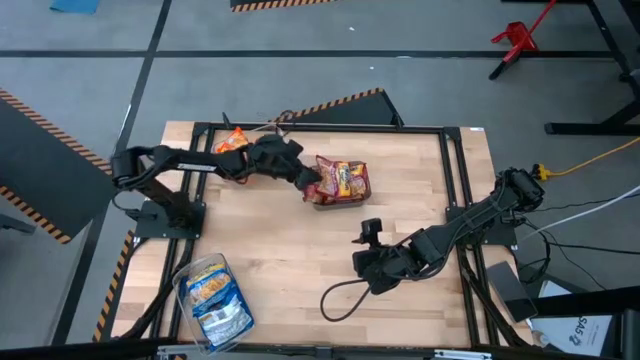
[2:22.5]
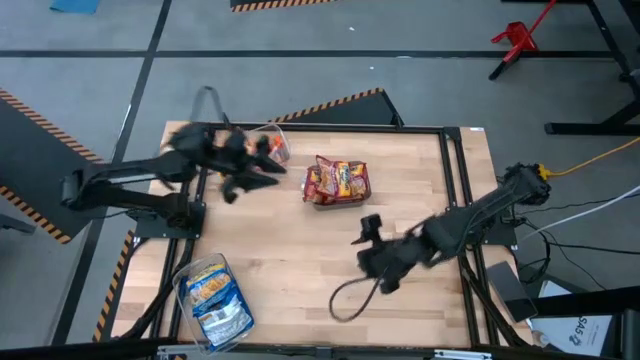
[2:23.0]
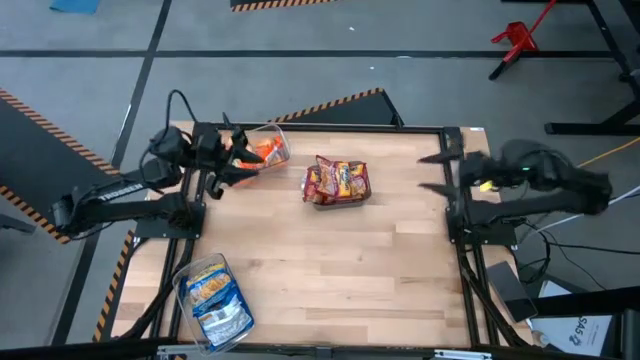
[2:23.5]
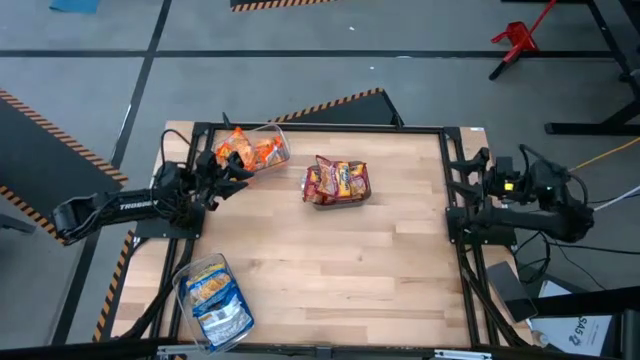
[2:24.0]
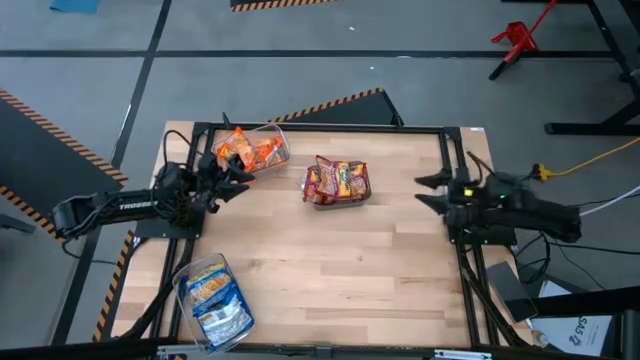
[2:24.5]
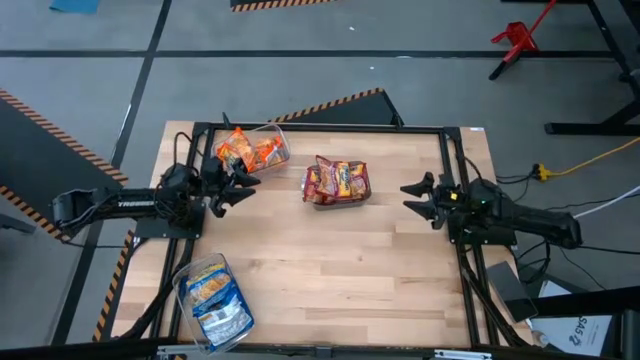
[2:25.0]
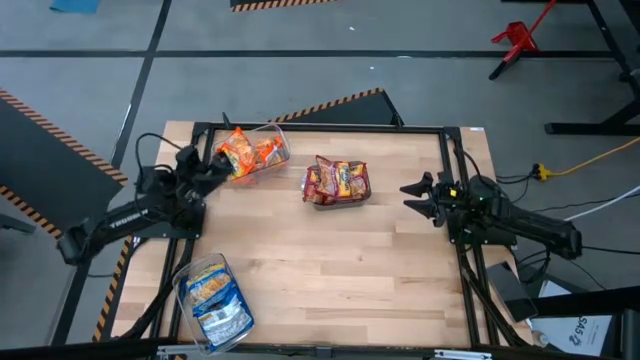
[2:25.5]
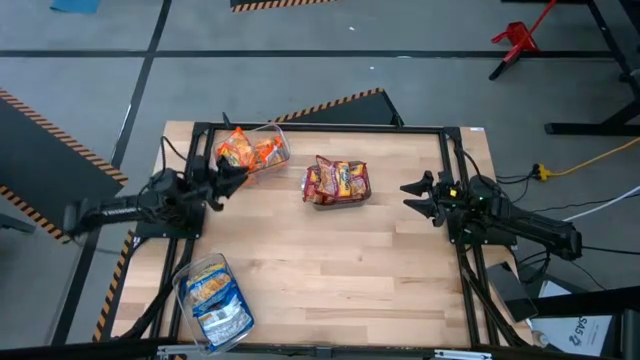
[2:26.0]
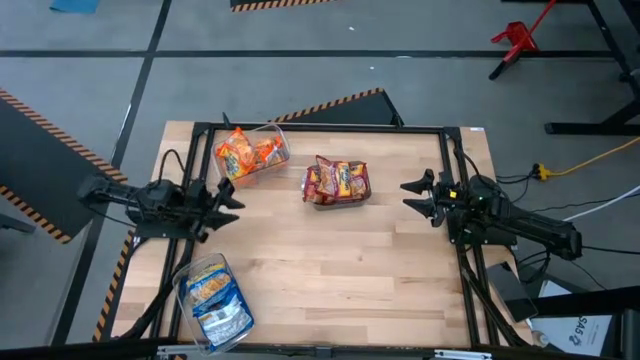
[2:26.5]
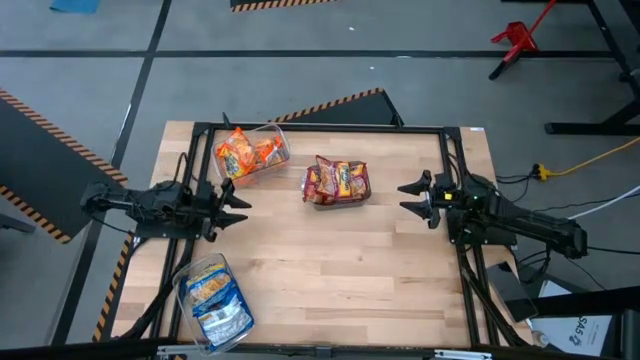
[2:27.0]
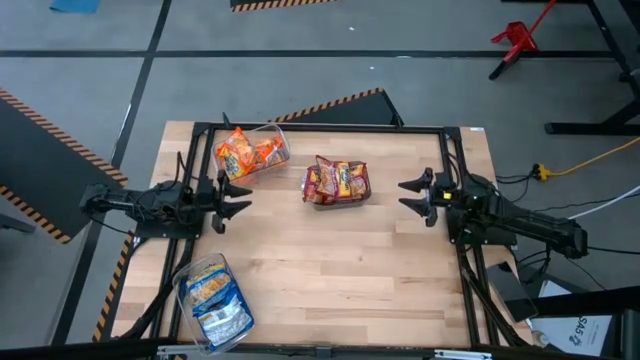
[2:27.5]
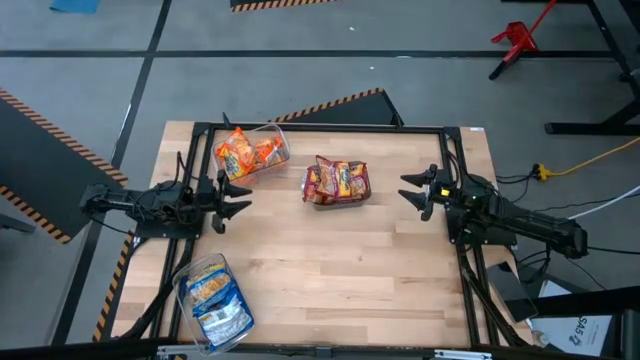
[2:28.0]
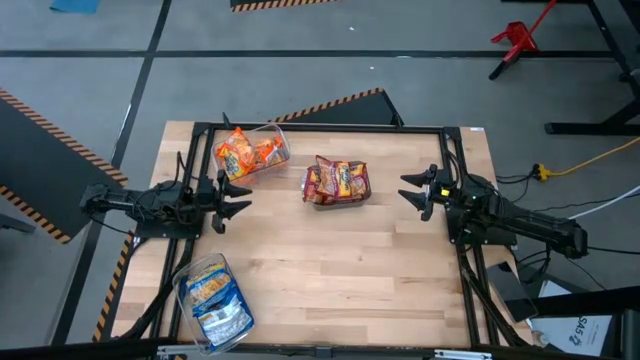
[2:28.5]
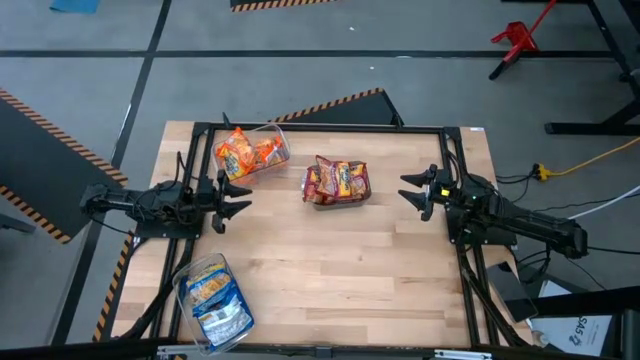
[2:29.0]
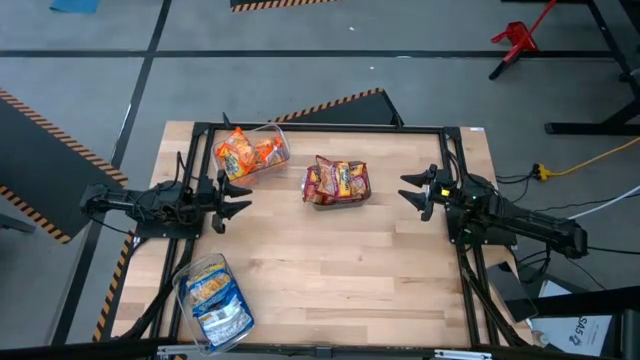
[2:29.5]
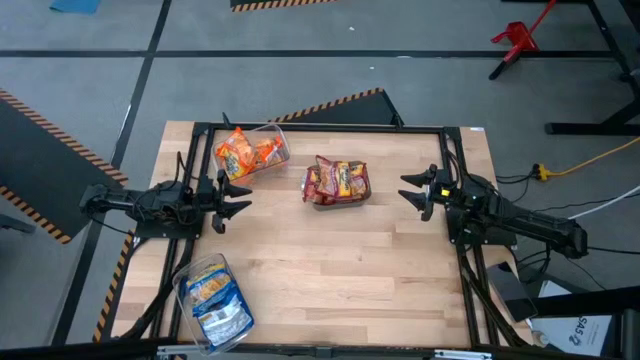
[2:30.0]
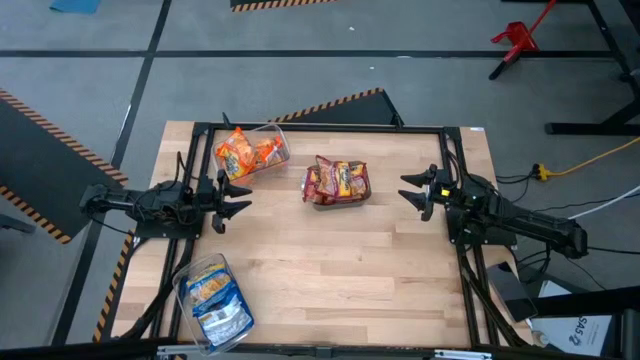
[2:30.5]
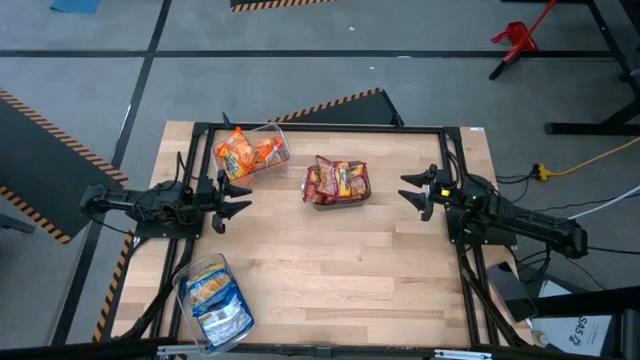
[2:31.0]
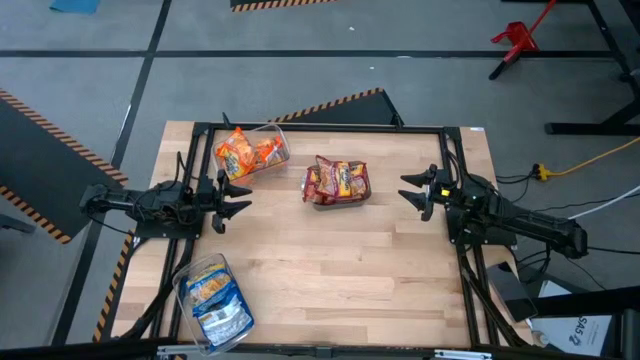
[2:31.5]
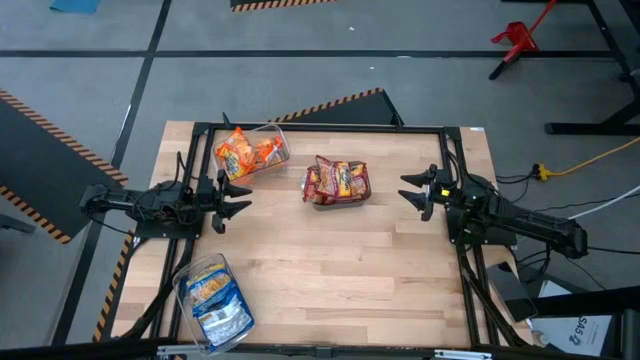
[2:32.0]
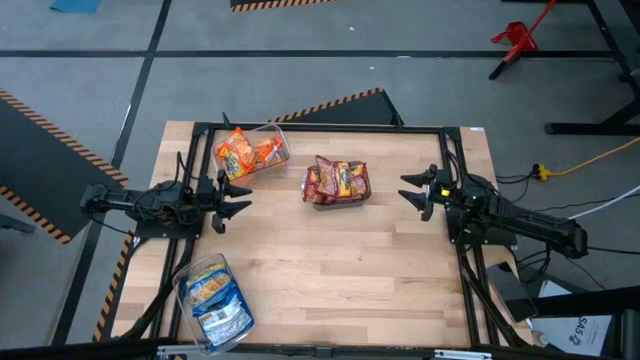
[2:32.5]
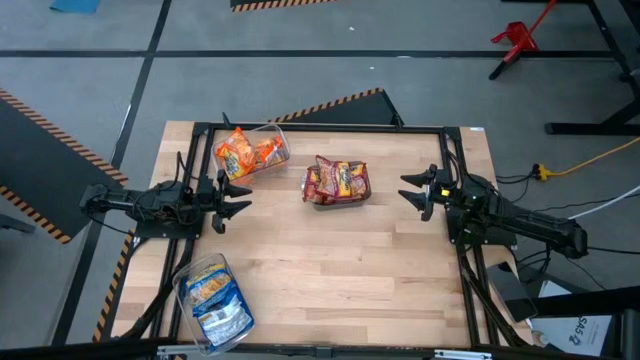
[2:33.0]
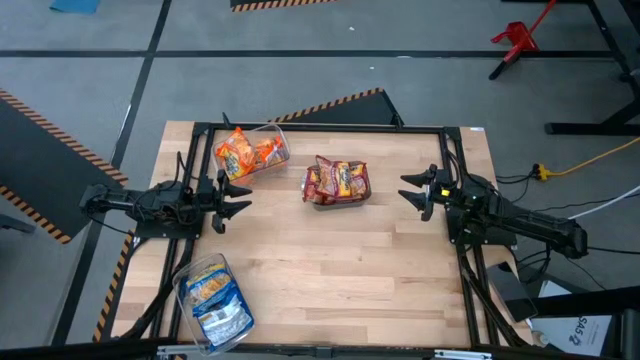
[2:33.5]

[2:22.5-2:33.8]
Task: Sort Maruchan noodles
Return to Home Position

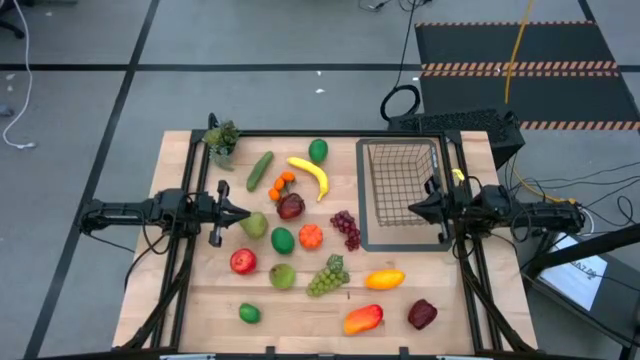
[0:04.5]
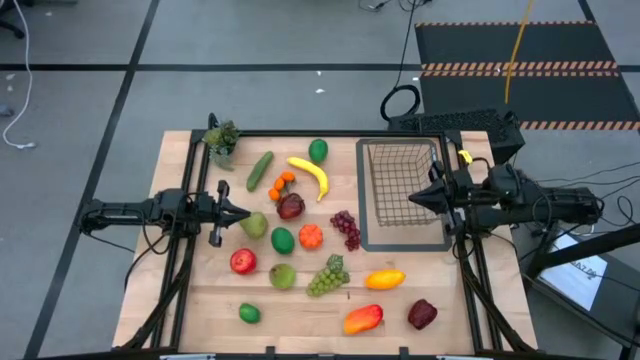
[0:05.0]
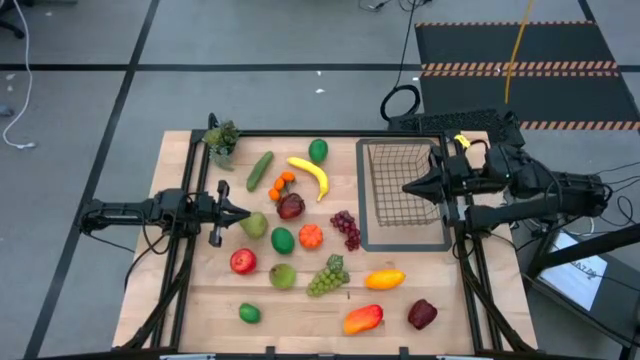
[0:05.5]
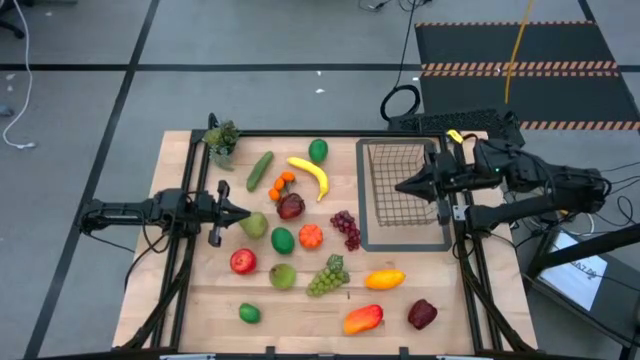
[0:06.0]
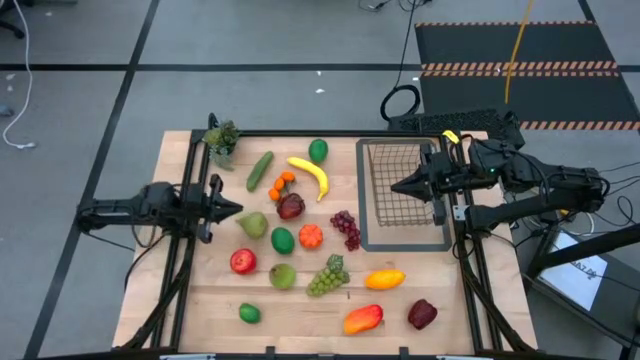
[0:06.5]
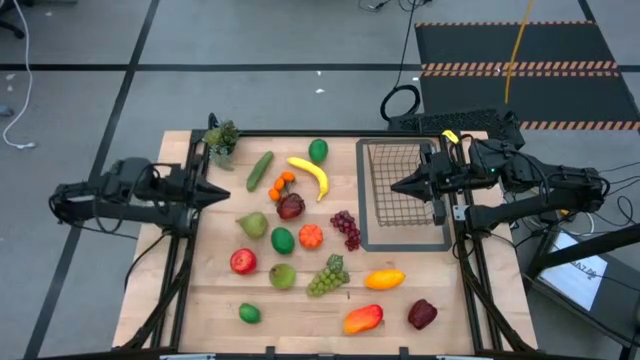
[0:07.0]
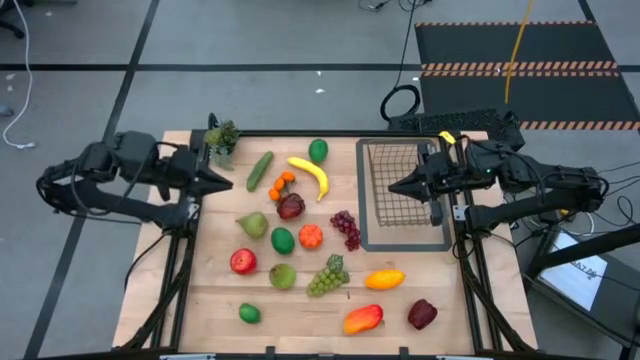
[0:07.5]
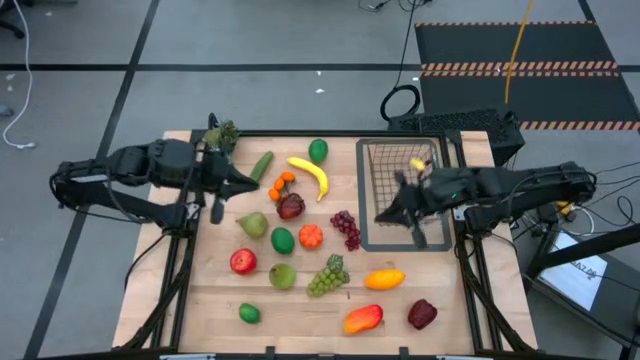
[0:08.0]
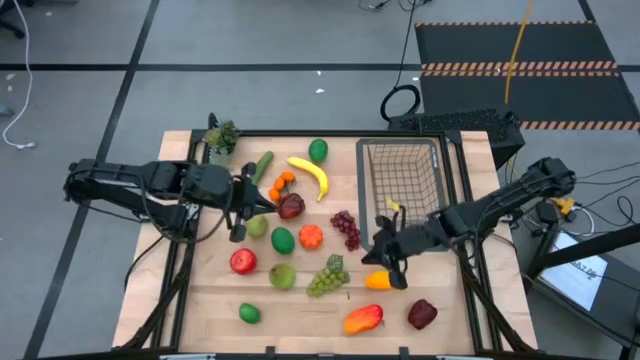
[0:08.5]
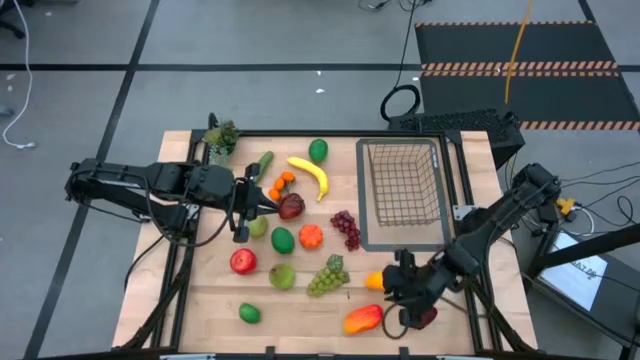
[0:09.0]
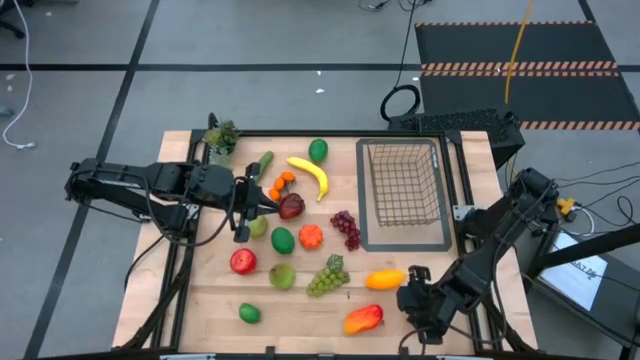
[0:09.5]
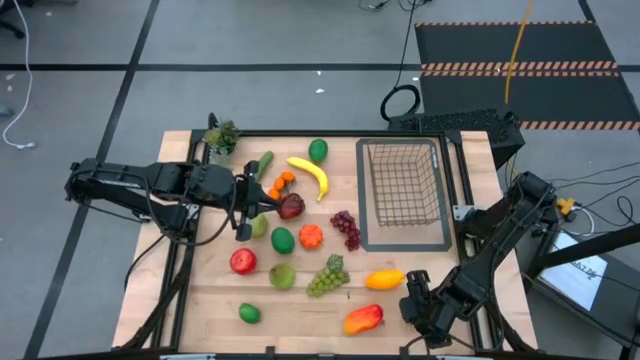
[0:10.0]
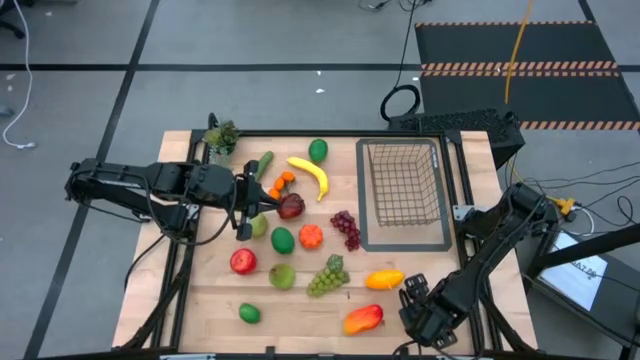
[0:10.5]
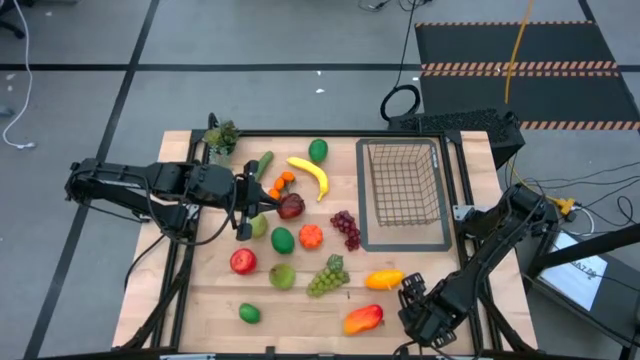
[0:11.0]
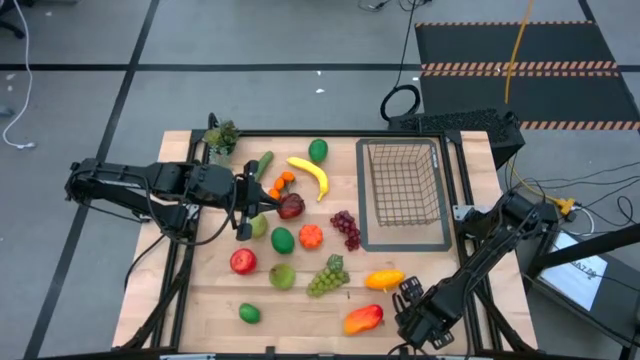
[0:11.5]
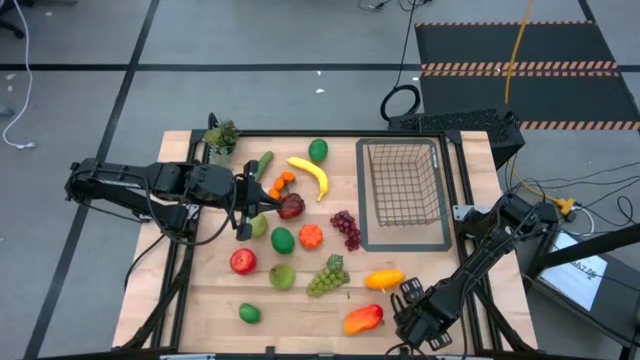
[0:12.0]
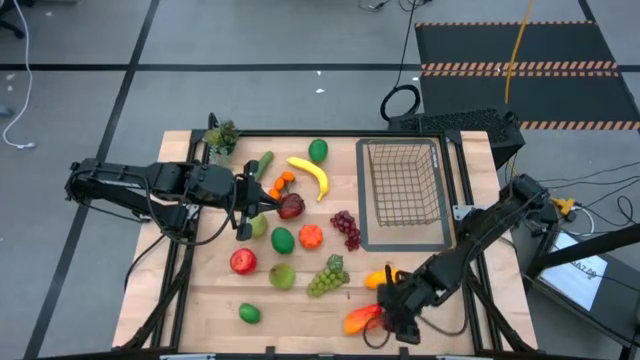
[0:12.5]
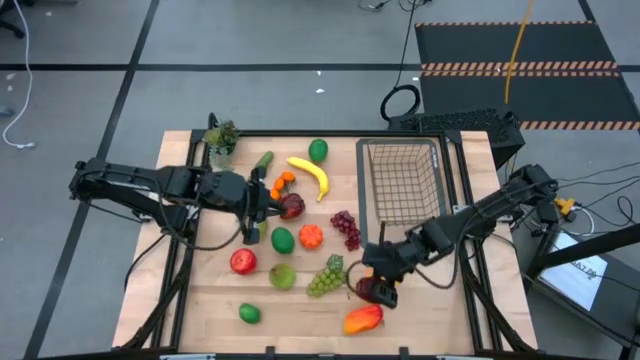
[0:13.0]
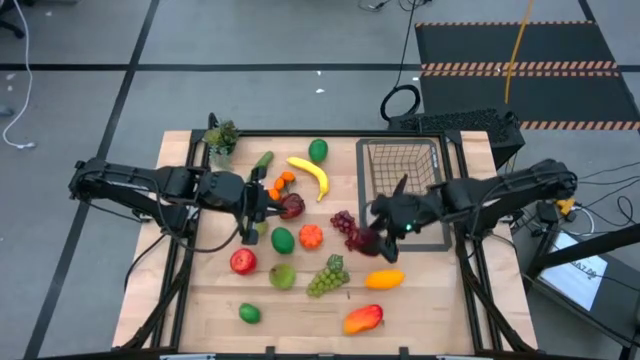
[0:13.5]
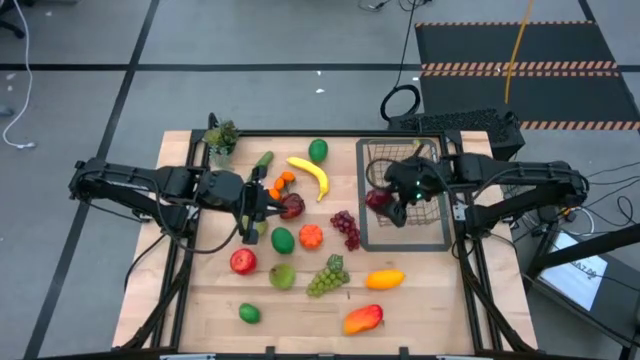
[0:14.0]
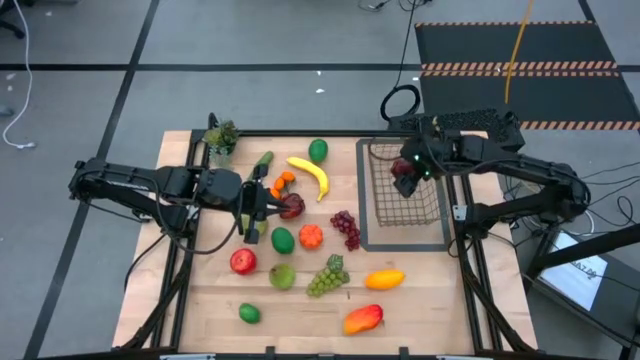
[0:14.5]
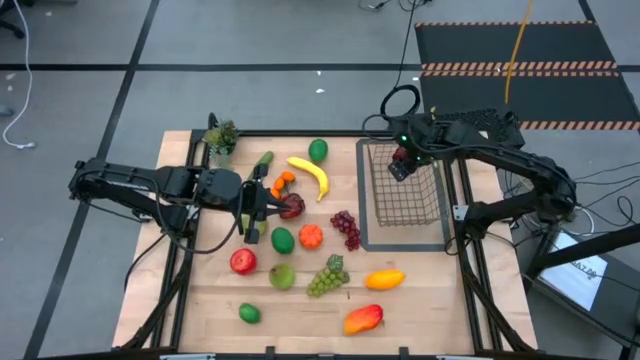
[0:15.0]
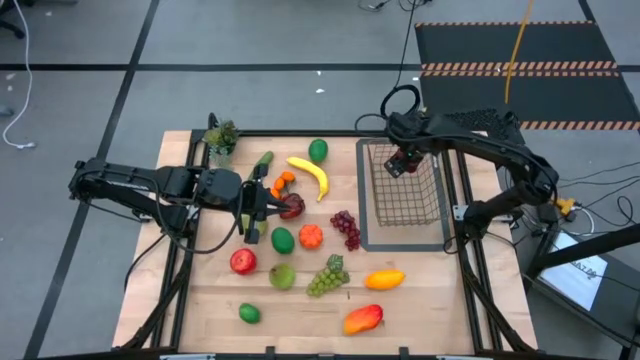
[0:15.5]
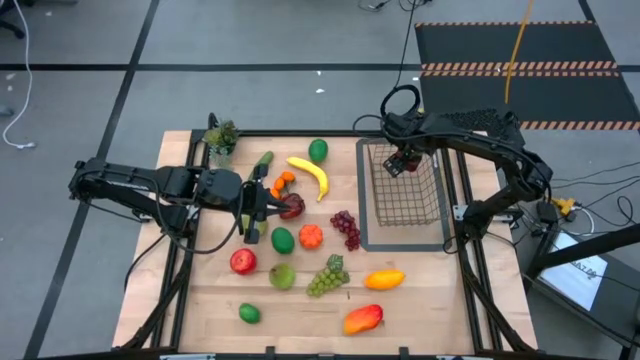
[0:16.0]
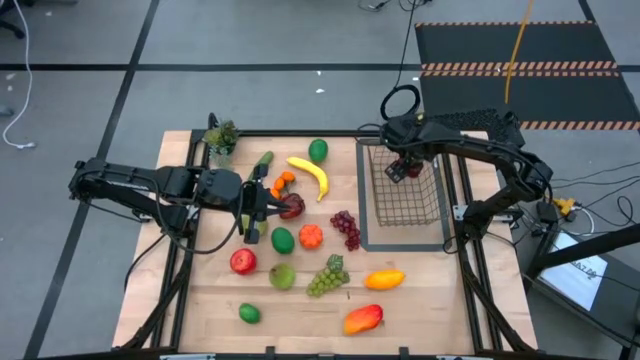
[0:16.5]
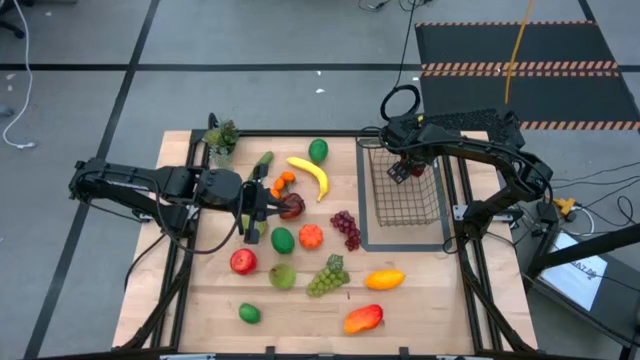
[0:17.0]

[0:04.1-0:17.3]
Task: Build produce basket
Put the bottom right apple into the gold wire basket
